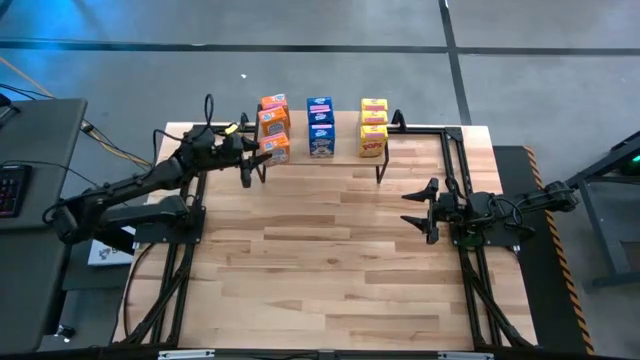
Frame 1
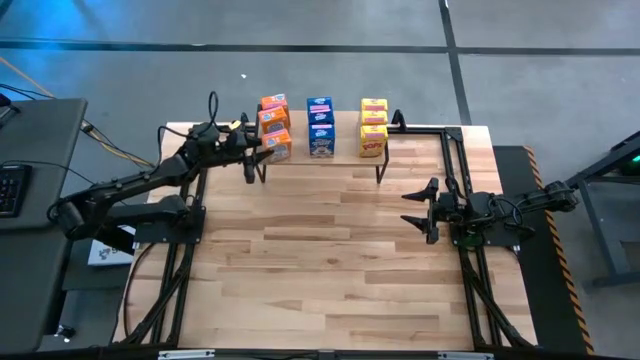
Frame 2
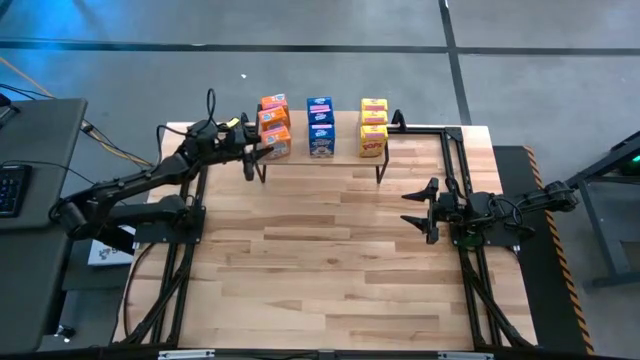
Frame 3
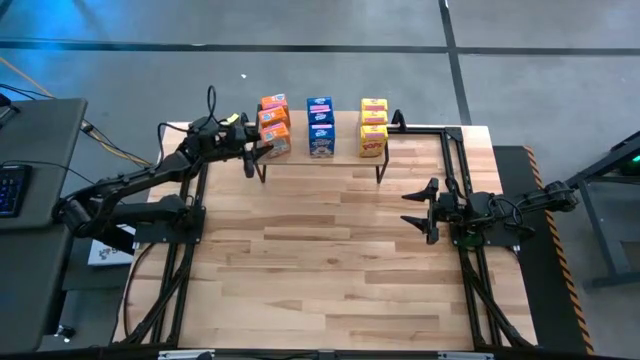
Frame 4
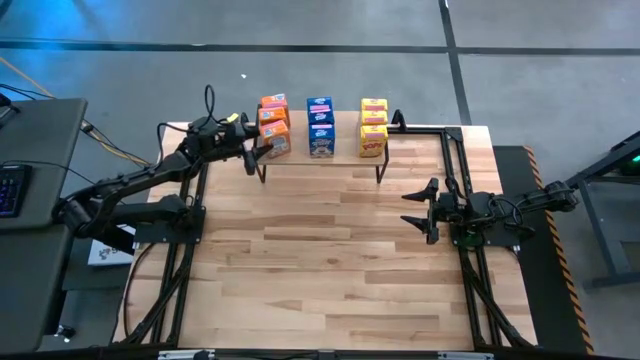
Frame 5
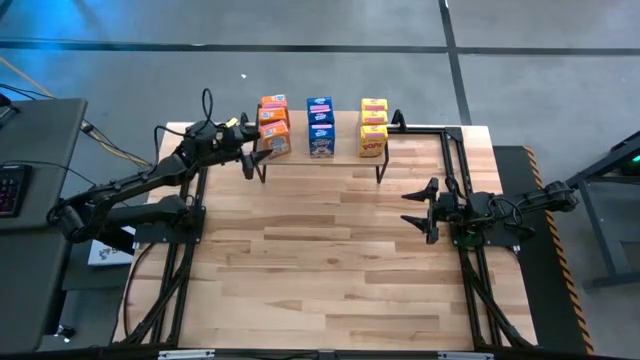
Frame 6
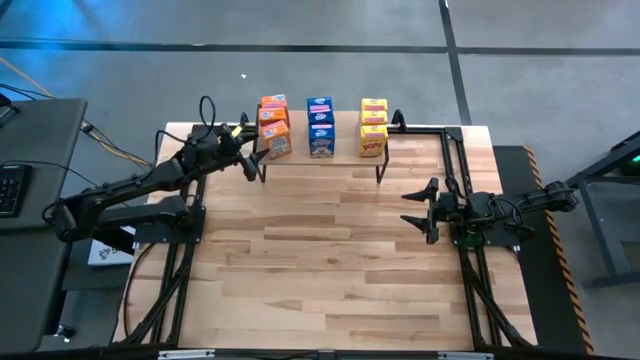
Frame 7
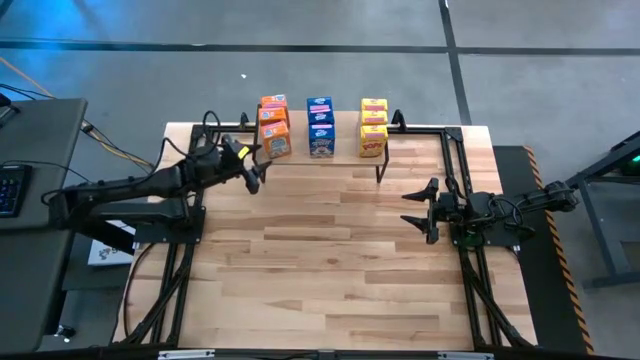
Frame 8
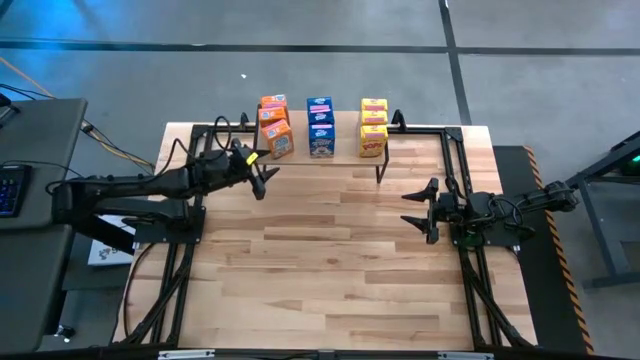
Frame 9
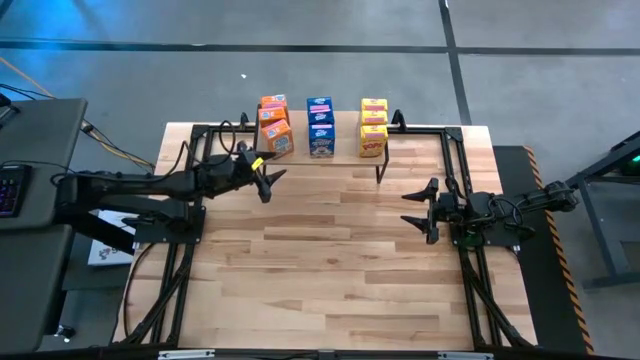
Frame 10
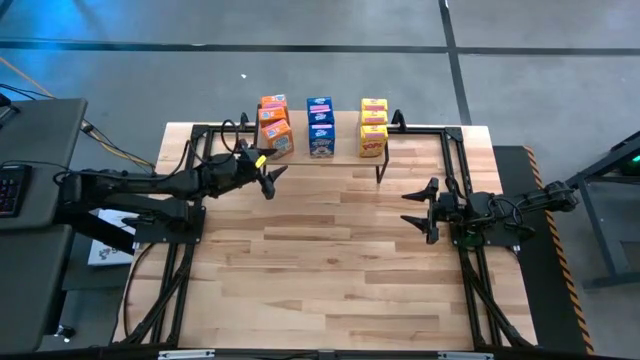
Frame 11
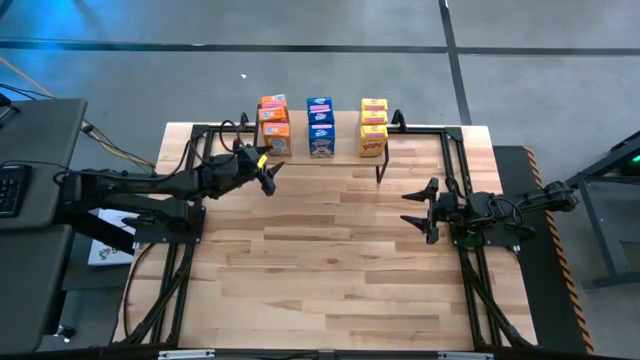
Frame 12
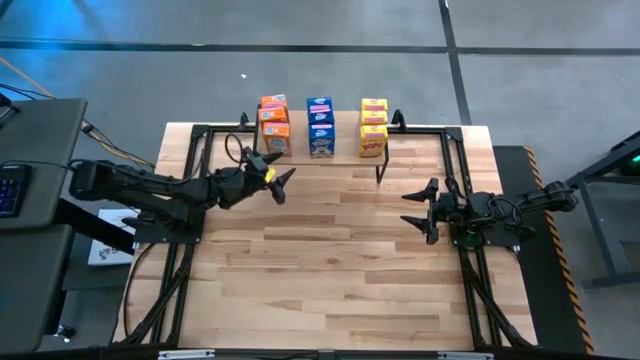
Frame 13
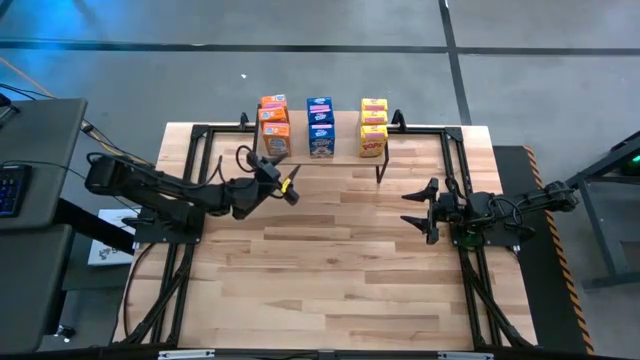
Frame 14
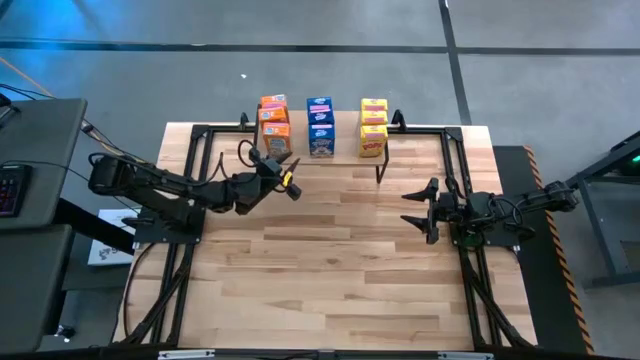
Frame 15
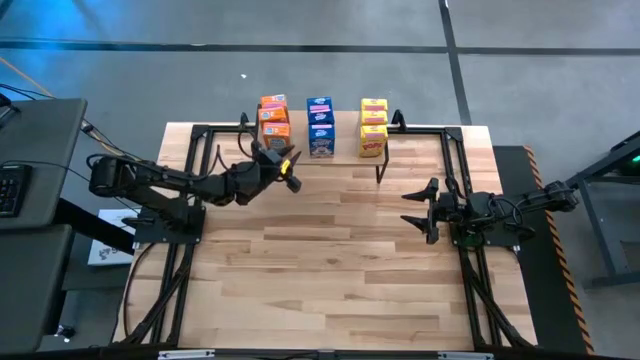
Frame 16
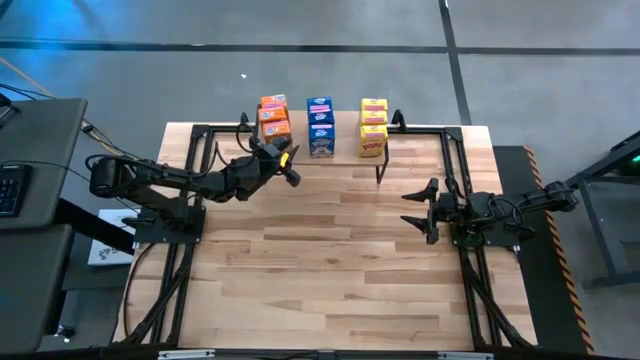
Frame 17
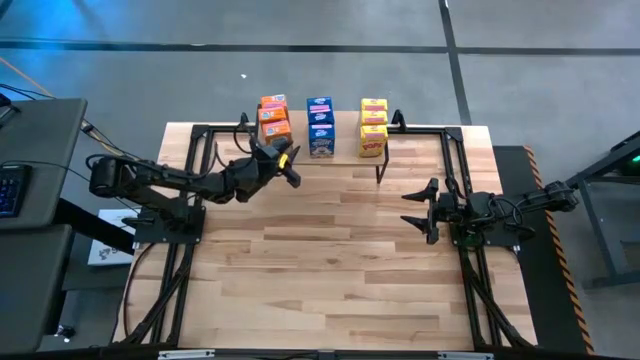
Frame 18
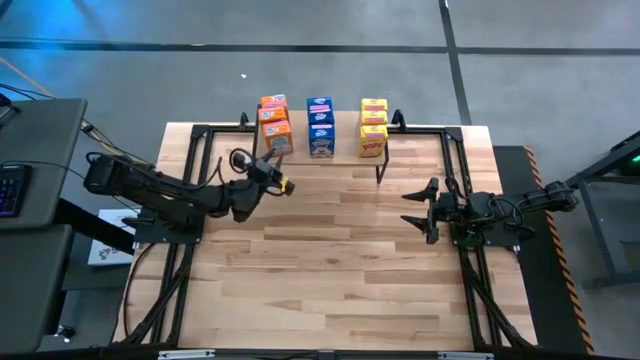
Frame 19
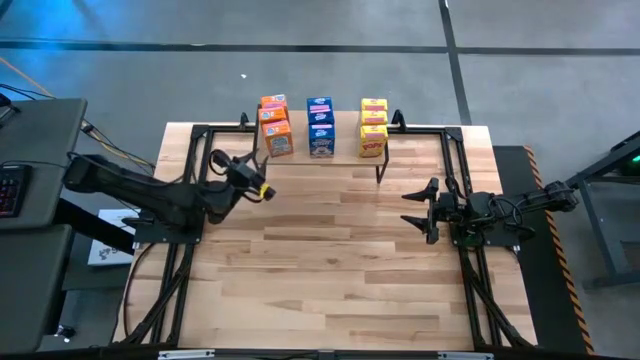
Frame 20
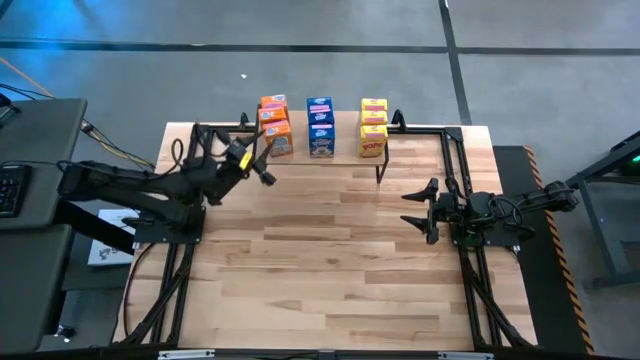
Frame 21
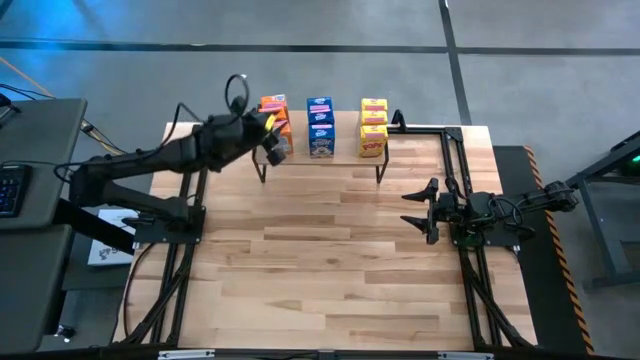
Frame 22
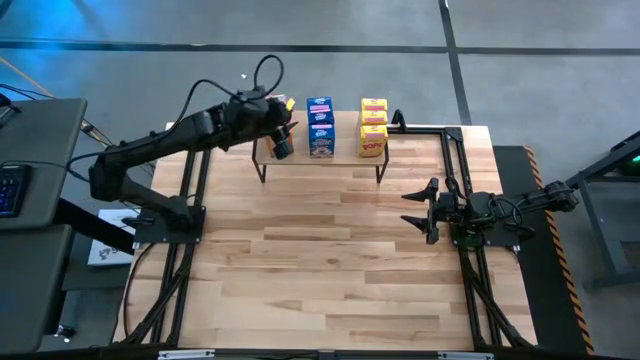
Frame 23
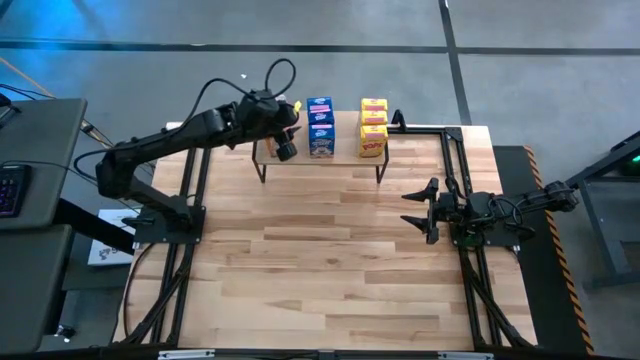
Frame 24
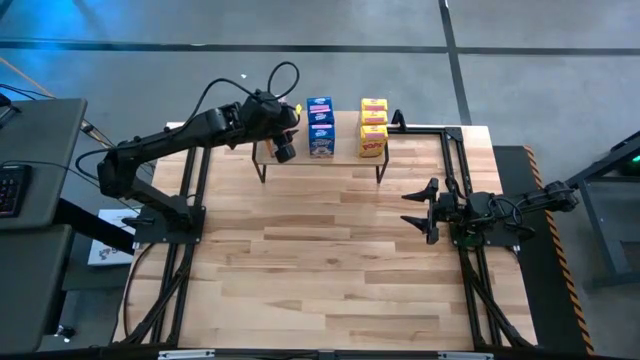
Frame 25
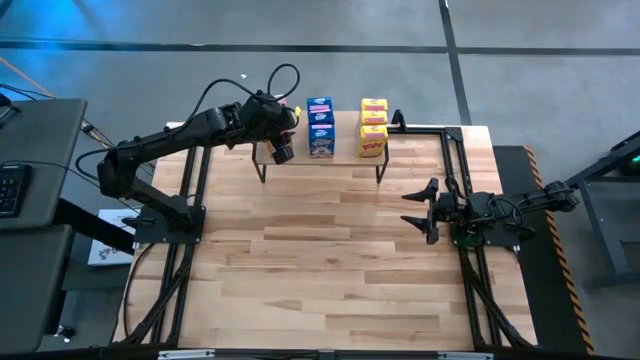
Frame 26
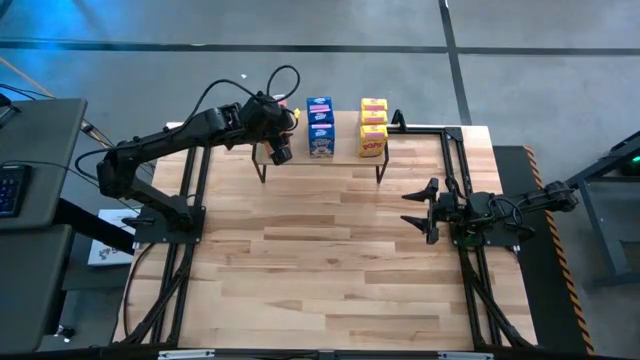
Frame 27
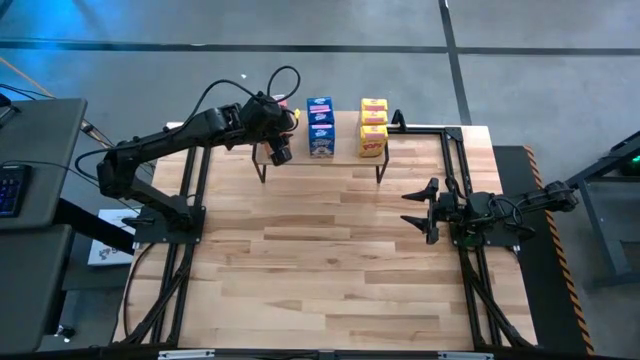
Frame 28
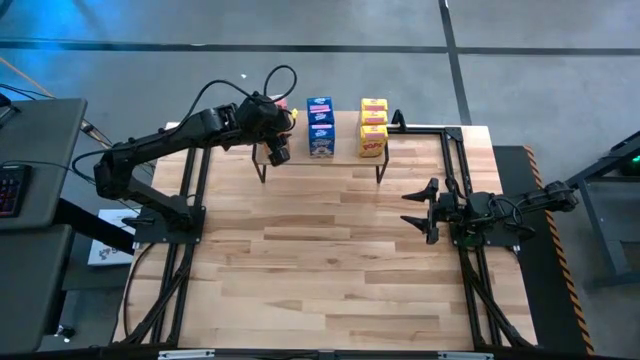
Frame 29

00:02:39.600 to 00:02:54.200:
Task: Stack cereal on shelf
Put the orange cereal box on the shelf aligned with the other orange cereal boxes

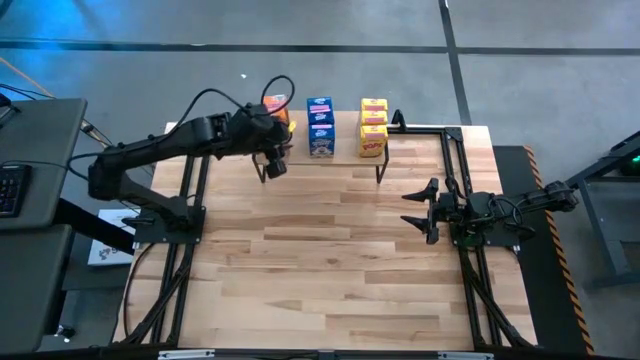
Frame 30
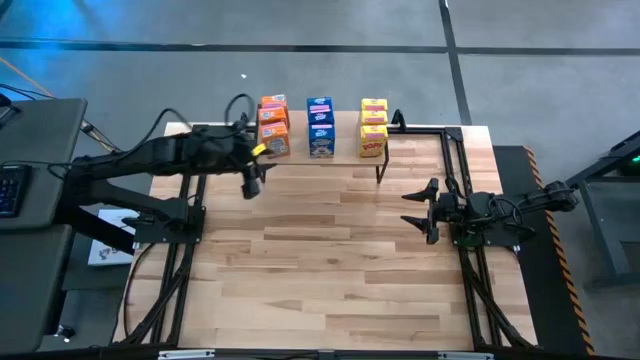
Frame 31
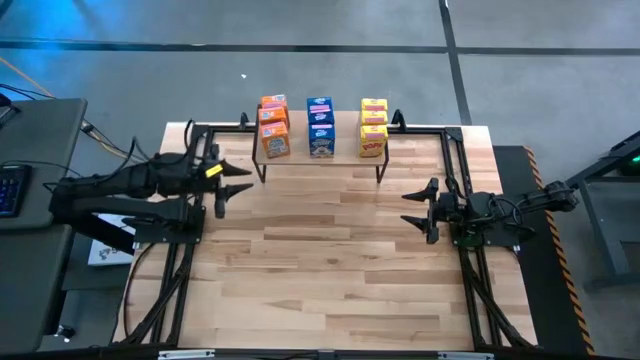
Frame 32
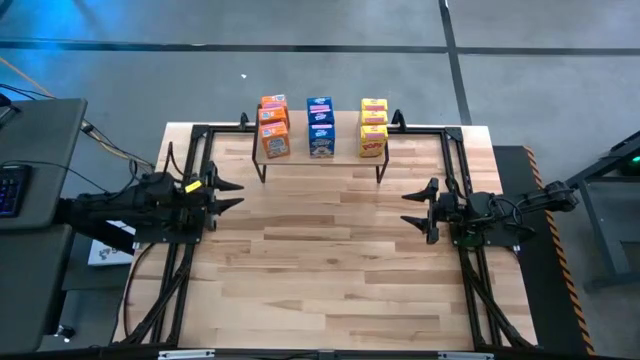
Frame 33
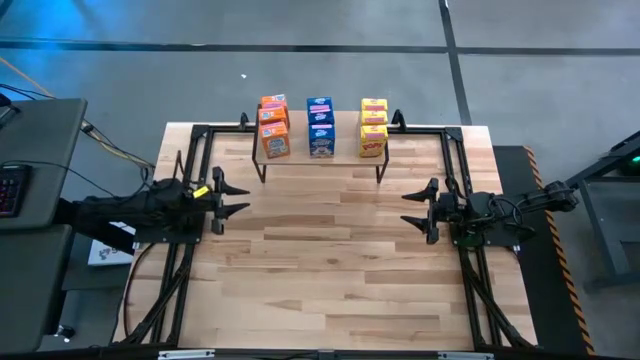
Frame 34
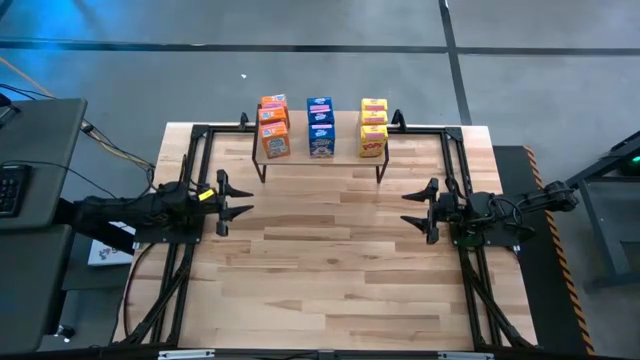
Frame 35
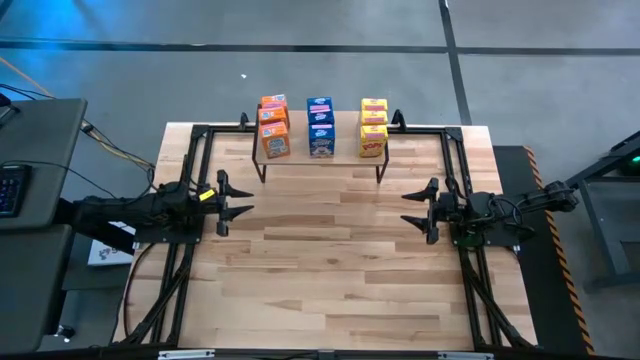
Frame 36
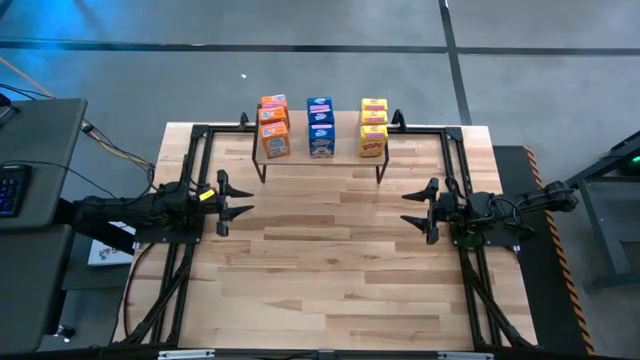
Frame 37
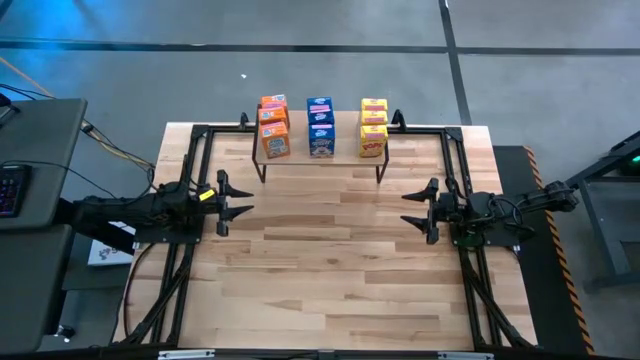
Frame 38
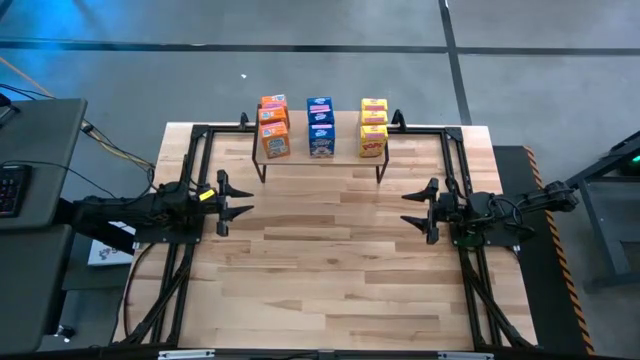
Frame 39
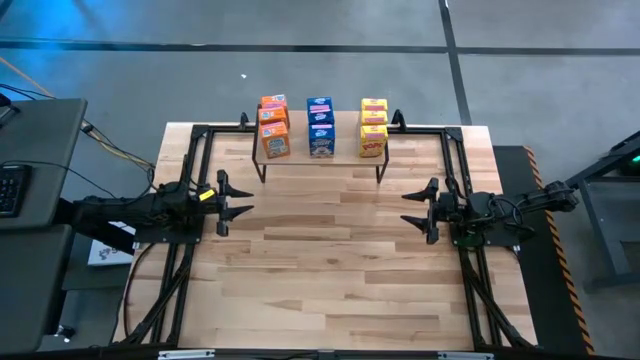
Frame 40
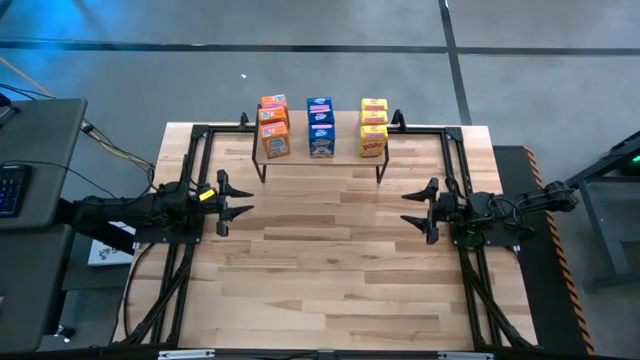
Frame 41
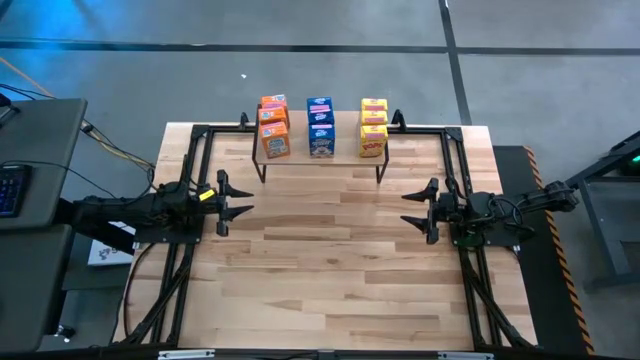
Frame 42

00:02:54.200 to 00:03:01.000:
Return to Home Position
